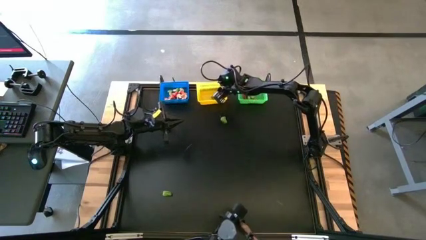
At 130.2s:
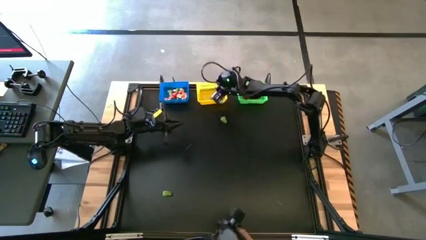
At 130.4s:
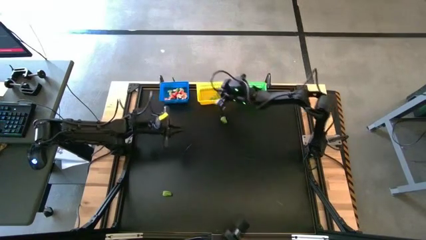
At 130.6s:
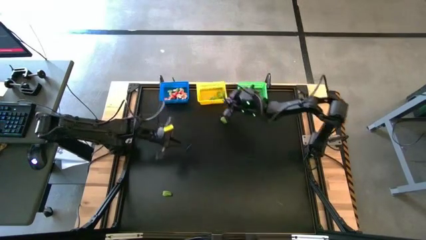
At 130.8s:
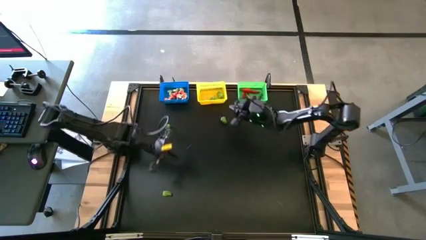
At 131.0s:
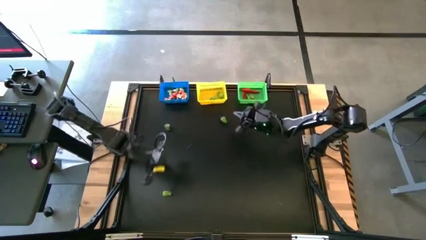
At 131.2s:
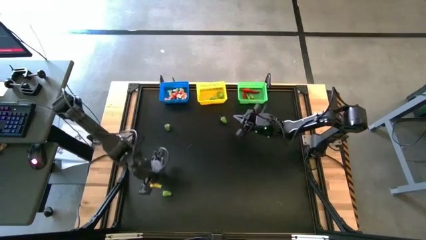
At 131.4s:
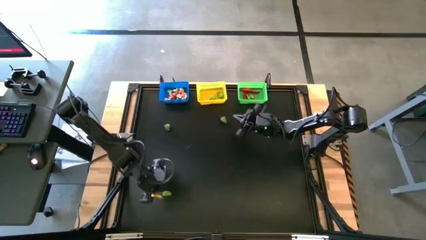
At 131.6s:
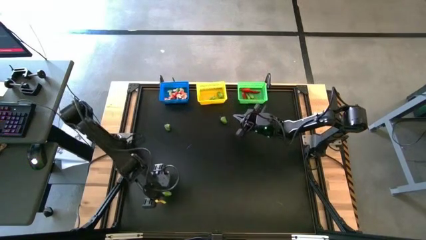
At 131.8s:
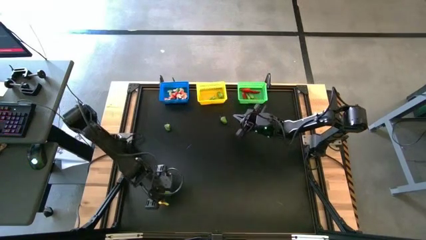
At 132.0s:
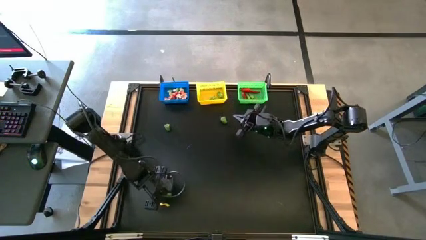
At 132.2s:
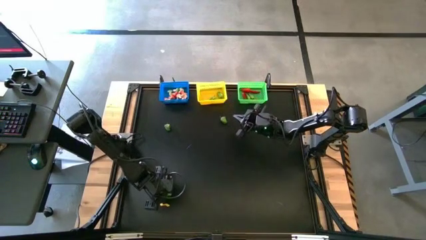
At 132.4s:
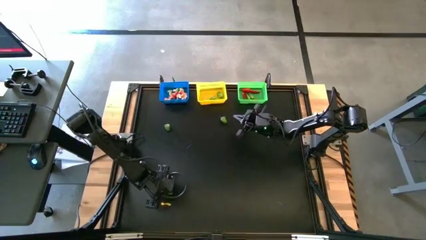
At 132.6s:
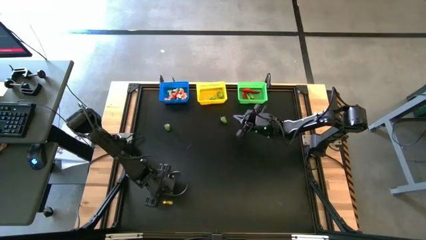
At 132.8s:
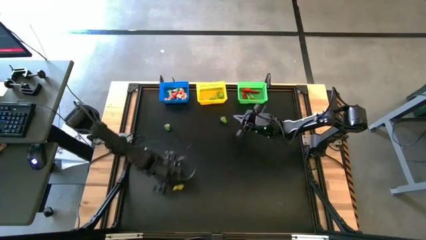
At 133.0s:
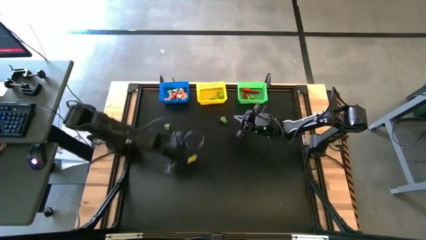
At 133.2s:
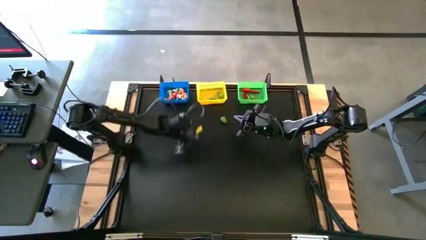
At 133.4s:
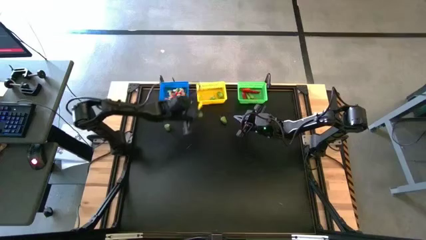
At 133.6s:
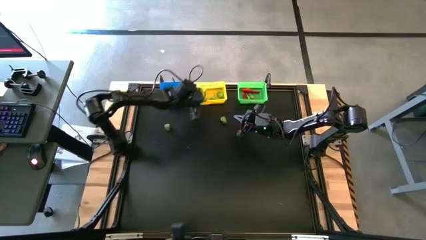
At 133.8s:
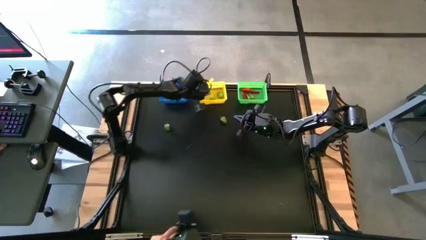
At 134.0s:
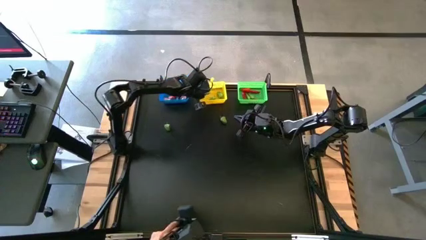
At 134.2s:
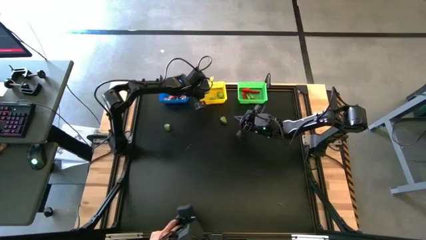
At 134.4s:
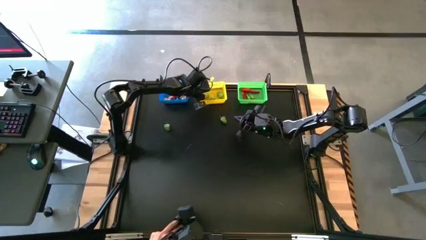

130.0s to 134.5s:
Task: Sort produce into baskets
Put the green chili pepper into the yellow bin

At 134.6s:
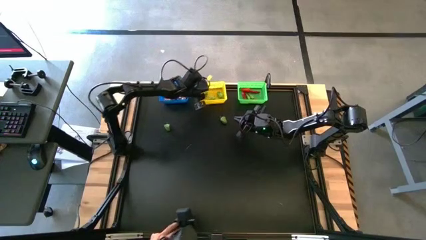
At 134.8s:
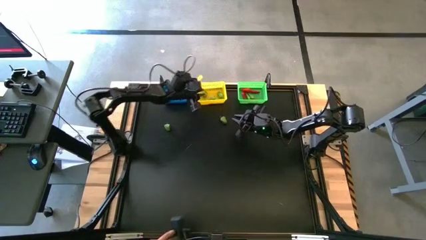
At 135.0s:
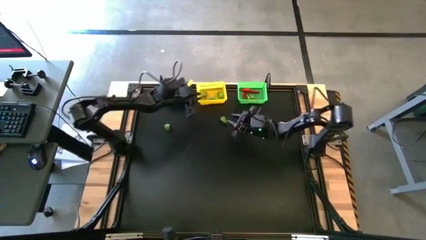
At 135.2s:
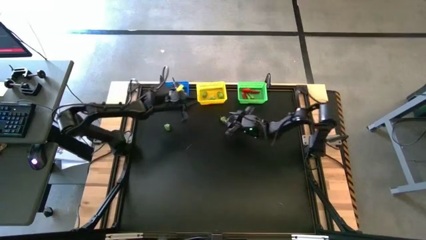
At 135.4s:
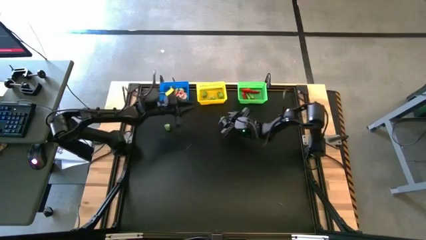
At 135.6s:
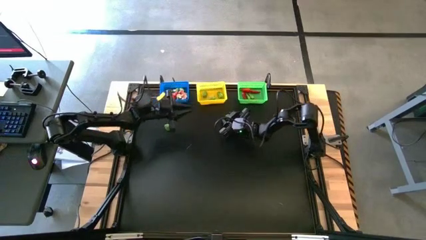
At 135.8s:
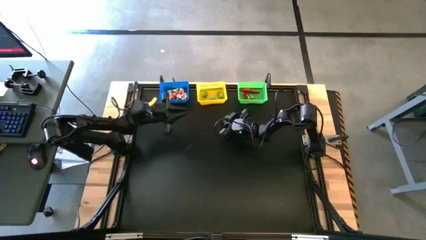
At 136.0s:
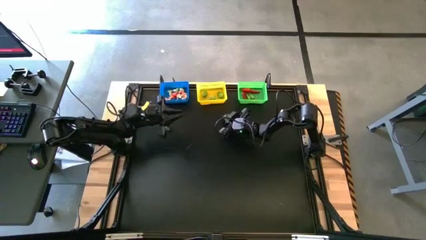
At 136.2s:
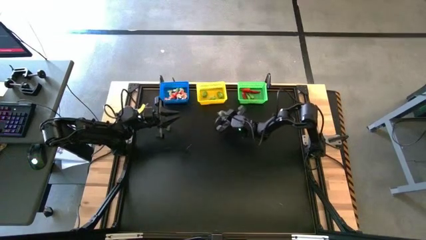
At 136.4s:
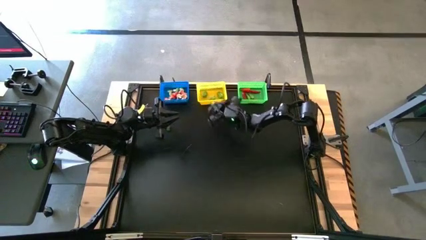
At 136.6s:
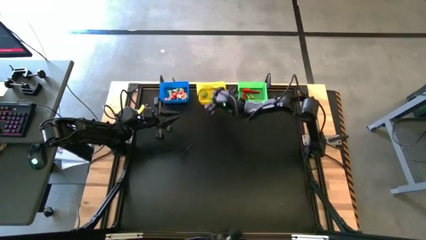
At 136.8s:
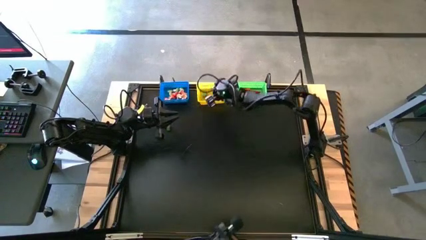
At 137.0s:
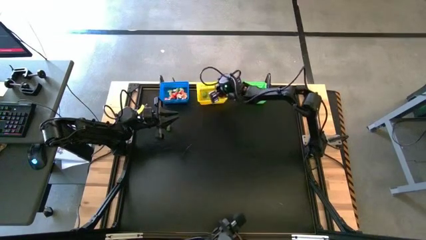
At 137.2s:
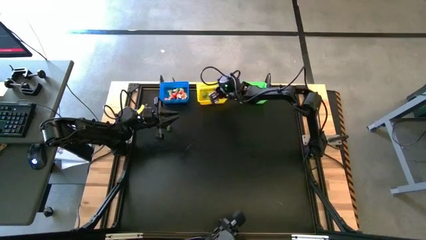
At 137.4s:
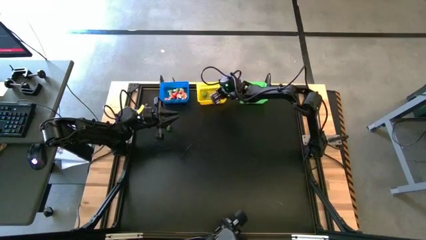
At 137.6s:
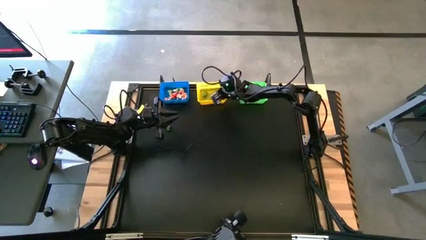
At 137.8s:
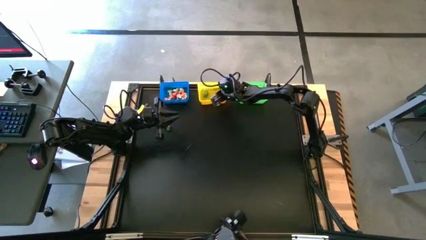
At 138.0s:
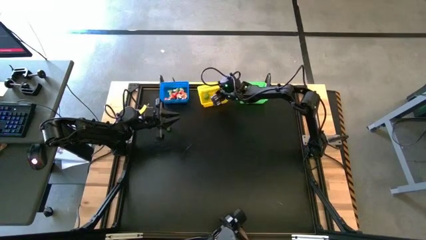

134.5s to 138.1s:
Put the green chili pepper into the yellow bin

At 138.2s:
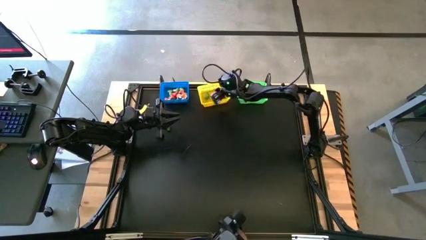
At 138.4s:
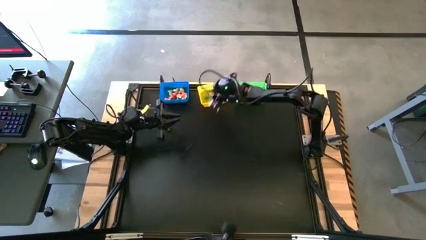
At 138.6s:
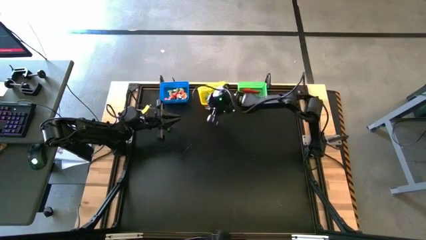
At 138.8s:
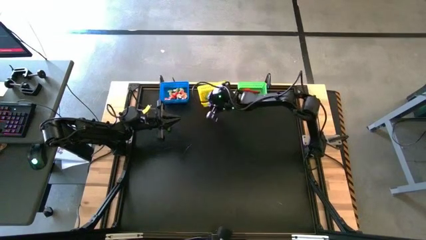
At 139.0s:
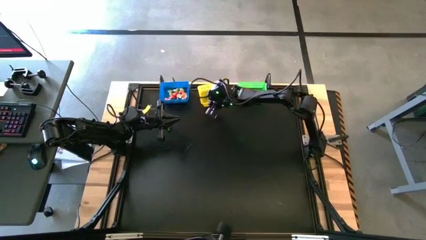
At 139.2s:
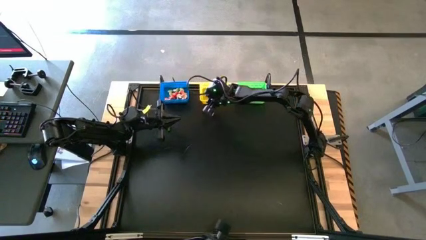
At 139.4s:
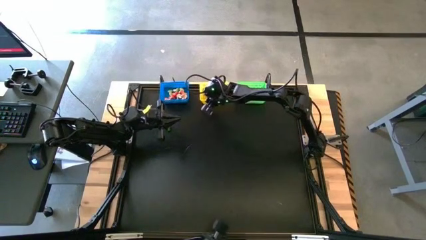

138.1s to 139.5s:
Adjust the yellow bin

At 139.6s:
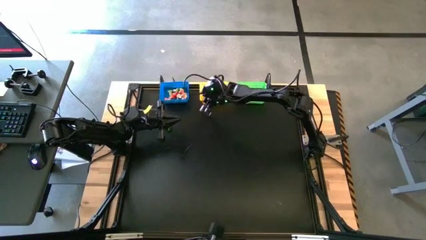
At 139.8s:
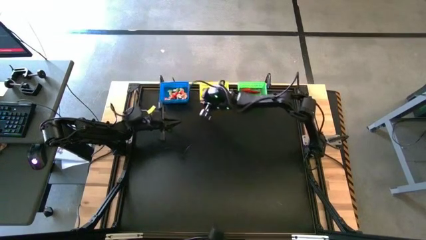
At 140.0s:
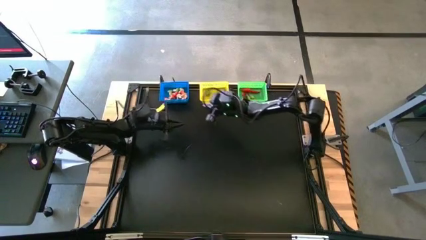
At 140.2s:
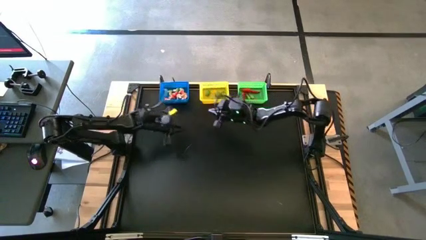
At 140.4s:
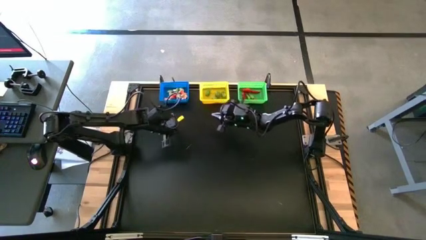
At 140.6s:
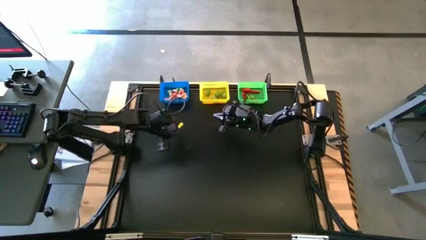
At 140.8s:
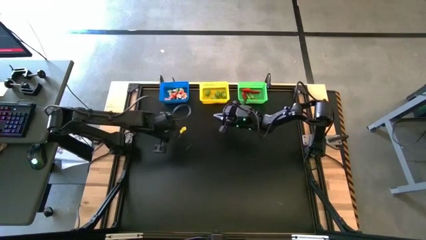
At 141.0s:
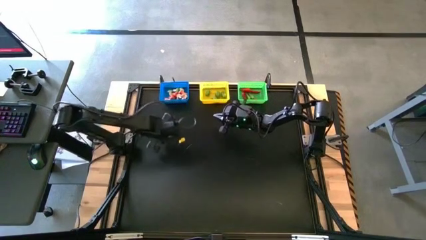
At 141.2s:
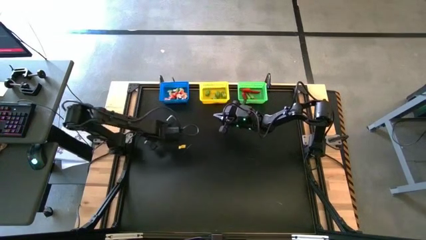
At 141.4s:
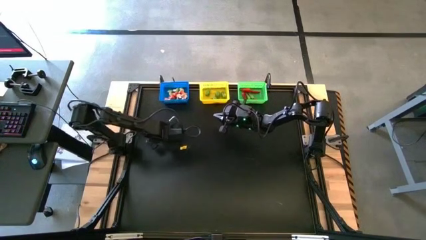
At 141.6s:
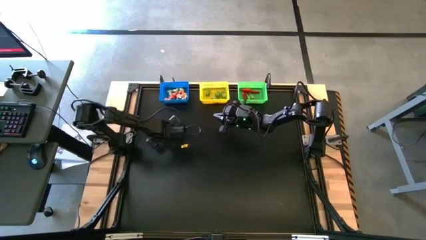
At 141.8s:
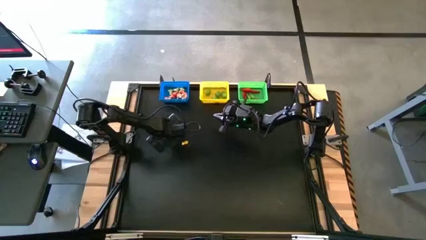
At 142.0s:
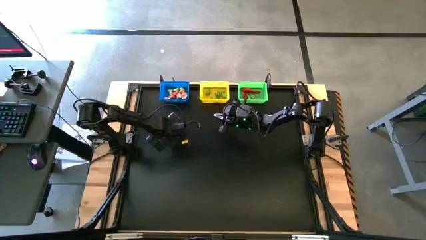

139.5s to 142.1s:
Put the green chili pepper into the yellow bin

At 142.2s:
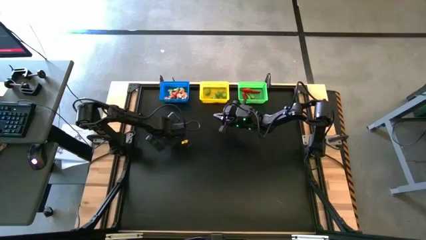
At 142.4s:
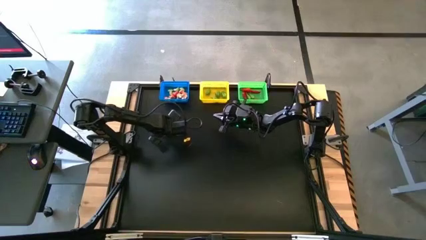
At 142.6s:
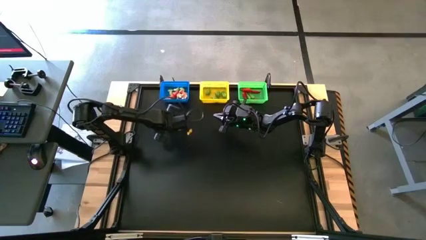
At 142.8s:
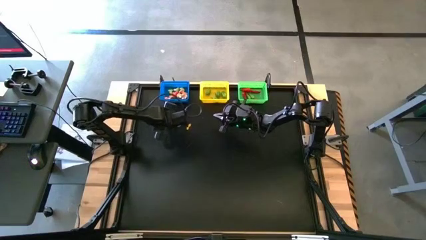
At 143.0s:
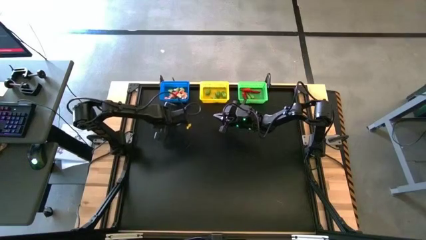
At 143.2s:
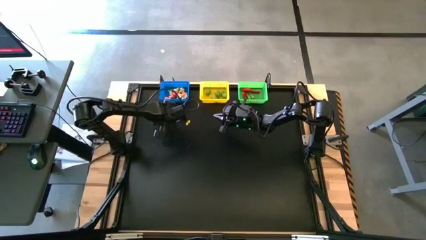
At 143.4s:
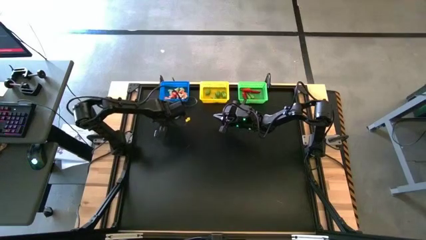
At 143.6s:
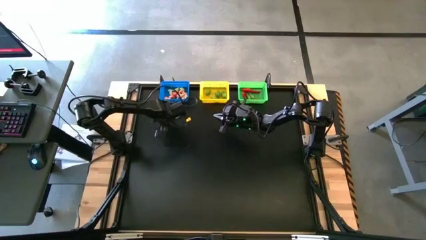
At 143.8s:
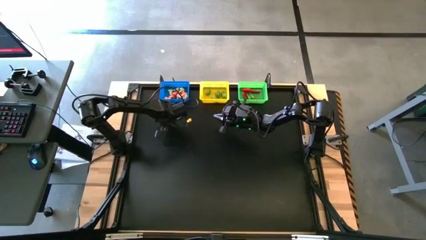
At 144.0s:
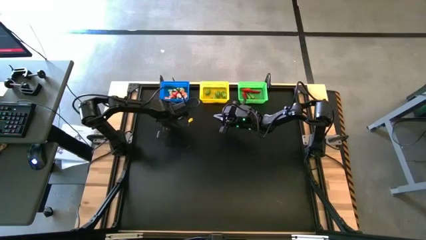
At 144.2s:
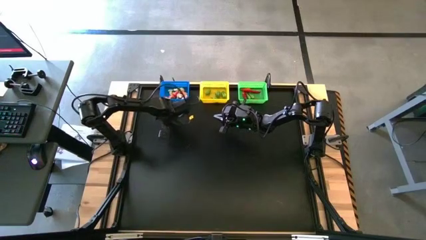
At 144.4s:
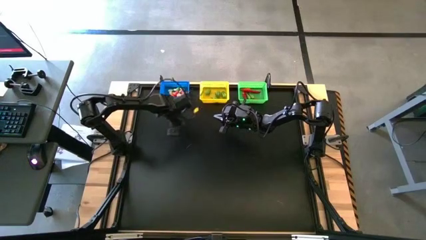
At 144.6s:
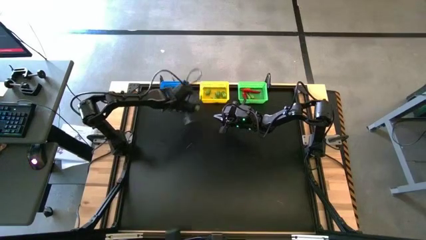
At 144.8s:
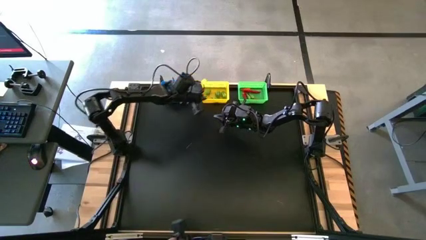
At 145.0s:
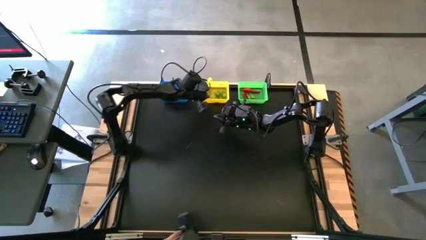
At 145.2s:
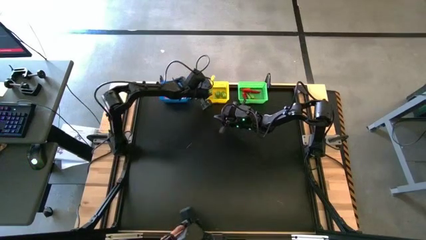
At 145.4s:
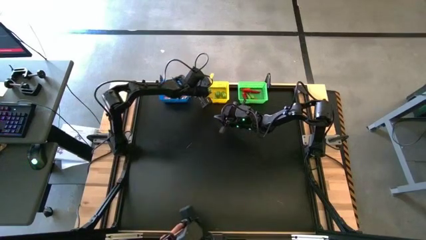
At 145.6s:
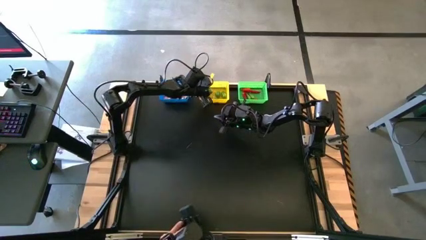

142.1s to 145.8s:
Put the green chili pepper into the yellow bin

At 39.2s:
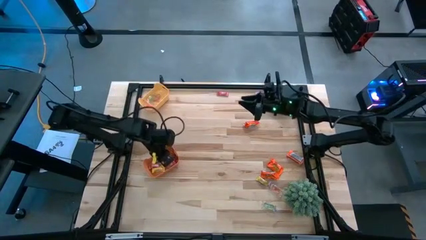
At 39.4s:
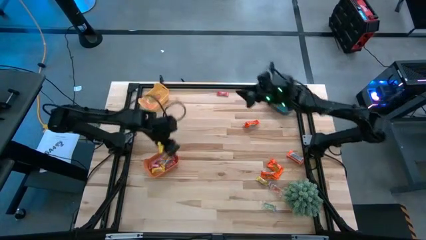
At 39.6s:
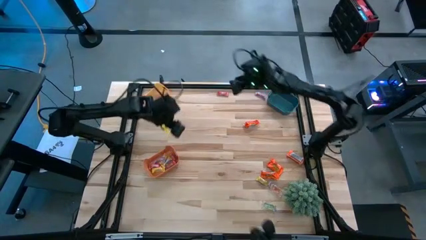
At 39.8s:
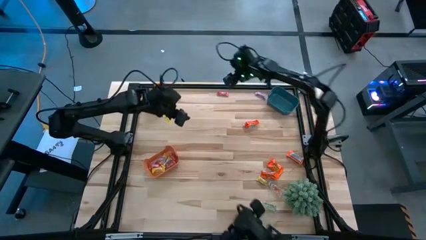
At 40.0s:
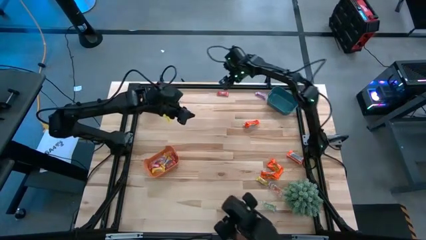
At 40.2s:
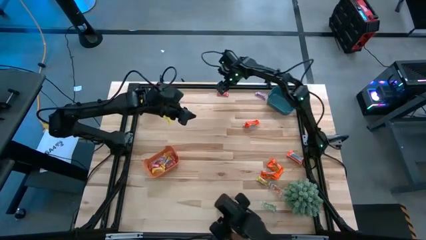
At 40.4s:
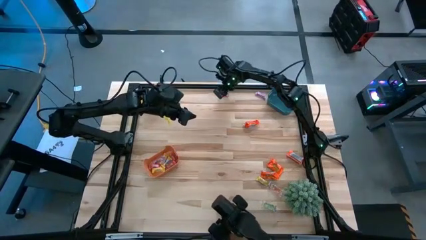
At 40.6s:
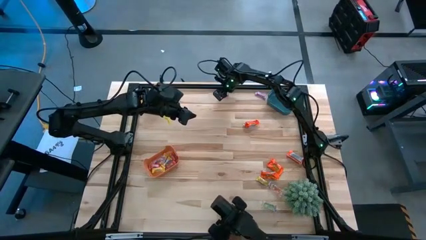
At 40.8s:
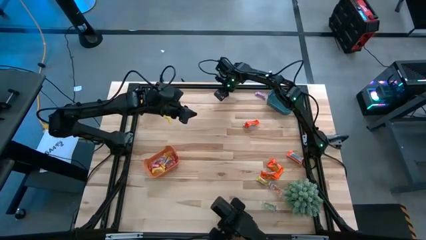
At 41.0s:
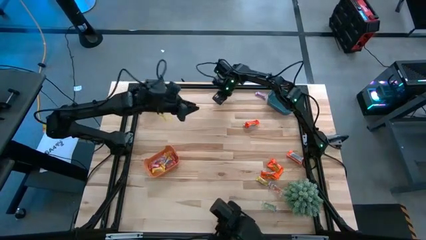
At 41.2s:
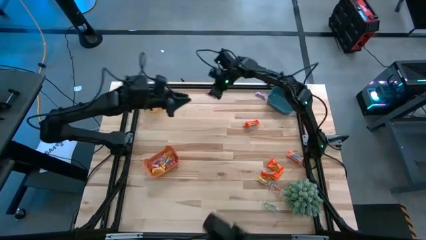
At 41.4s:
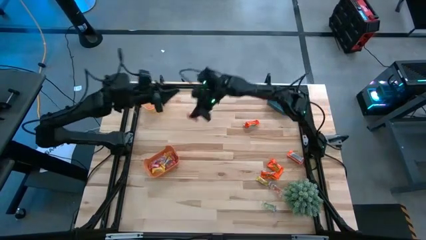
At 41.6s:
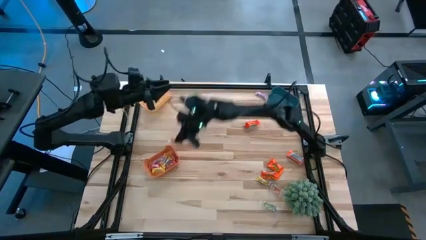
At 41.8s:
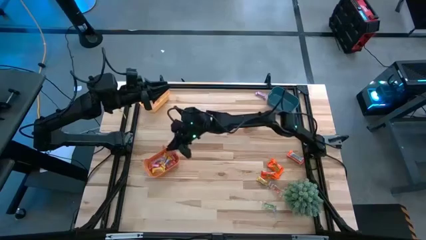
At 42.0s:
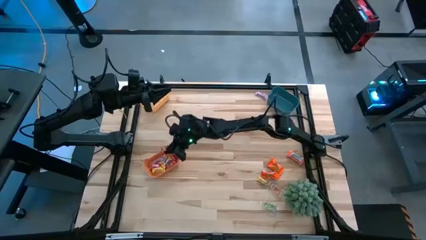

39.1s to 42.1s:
Task: Sort candy
Put the red candy into the orange bin
